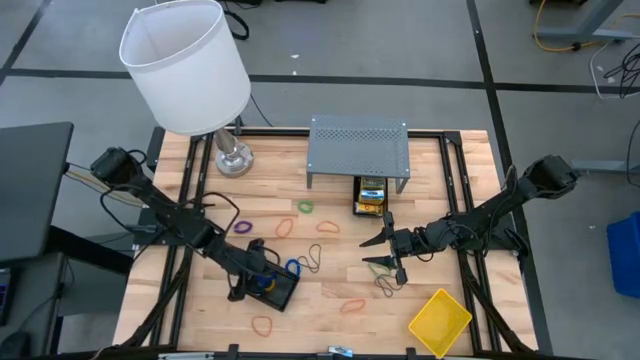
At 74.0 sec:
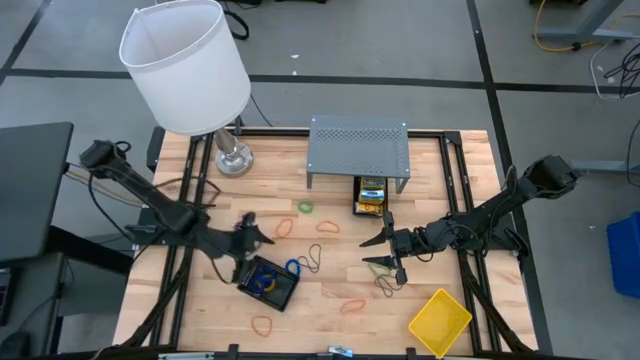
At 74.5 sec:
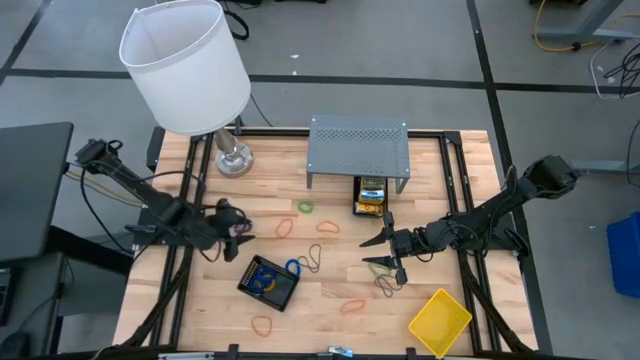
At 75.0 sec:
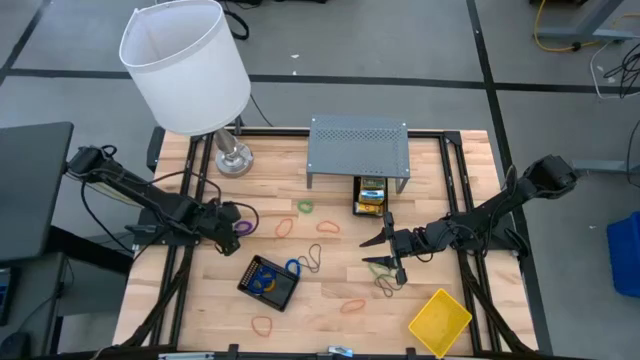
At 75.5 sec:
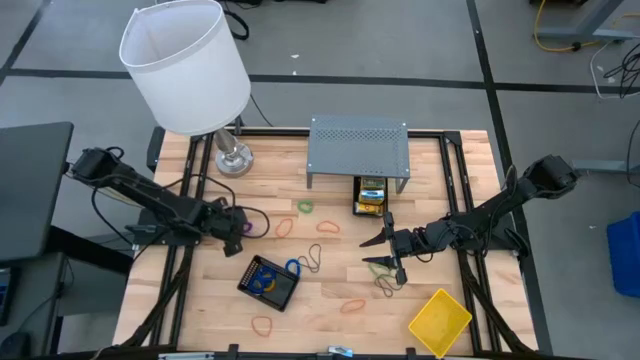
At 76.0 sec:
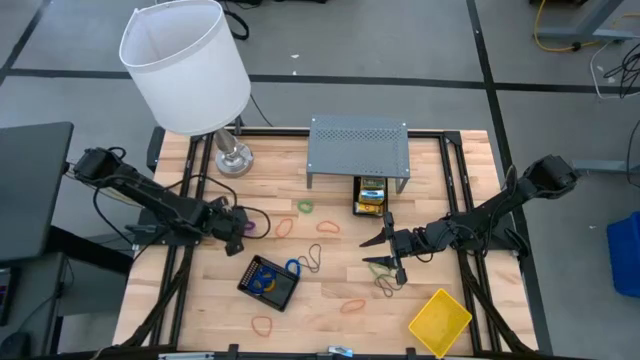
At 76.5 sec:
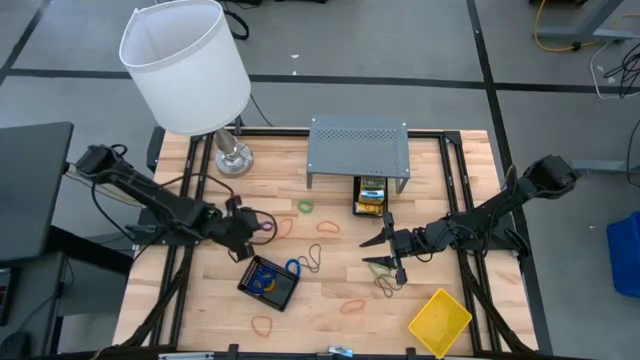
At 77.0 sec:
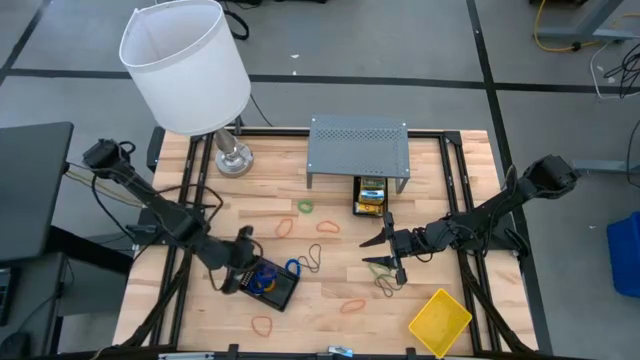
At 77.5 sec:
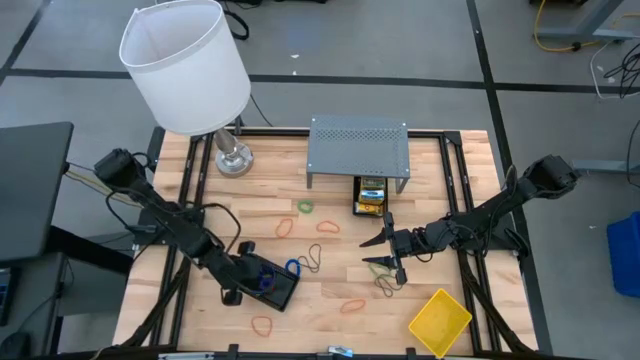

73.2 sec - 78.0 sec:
Task: Pick & Place Office Desk Supplies
Put the purple spring keychain into the bottom black bin

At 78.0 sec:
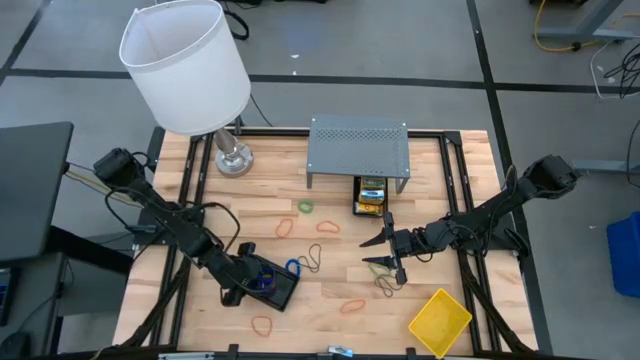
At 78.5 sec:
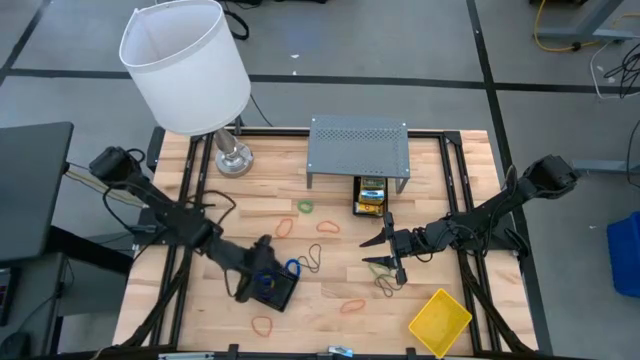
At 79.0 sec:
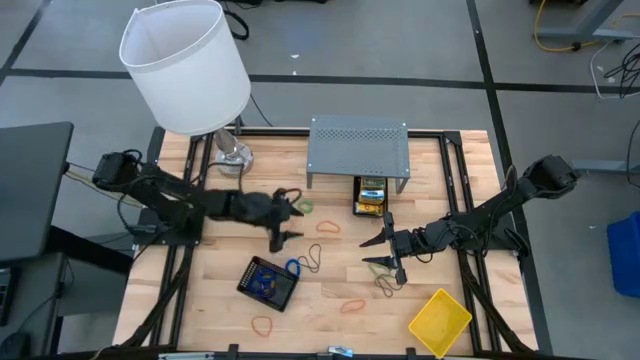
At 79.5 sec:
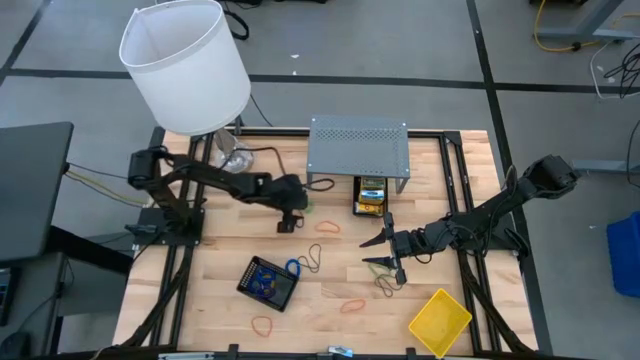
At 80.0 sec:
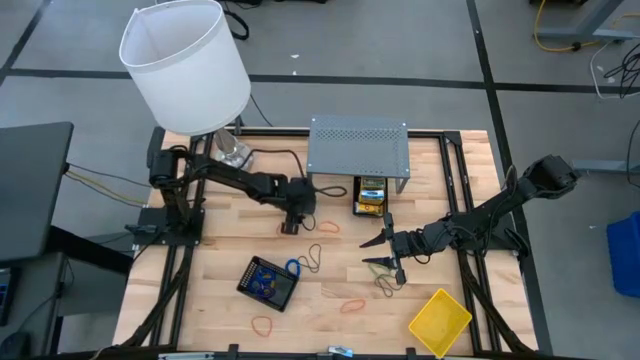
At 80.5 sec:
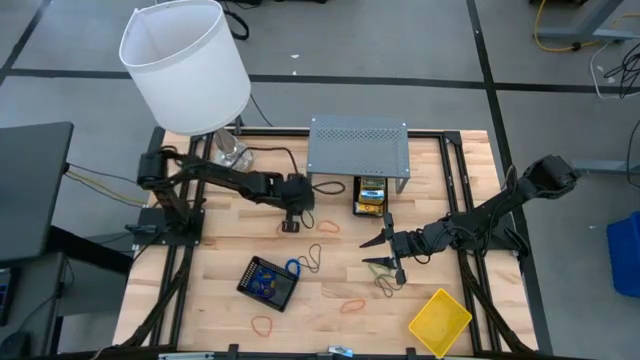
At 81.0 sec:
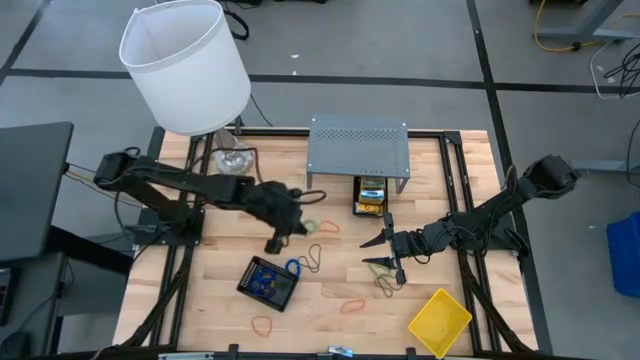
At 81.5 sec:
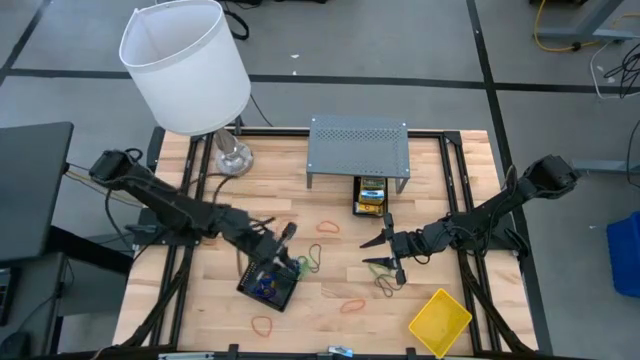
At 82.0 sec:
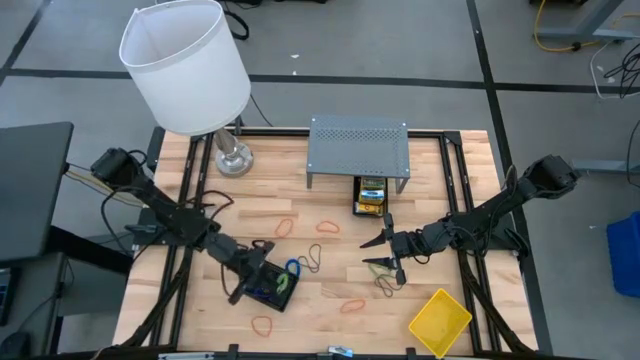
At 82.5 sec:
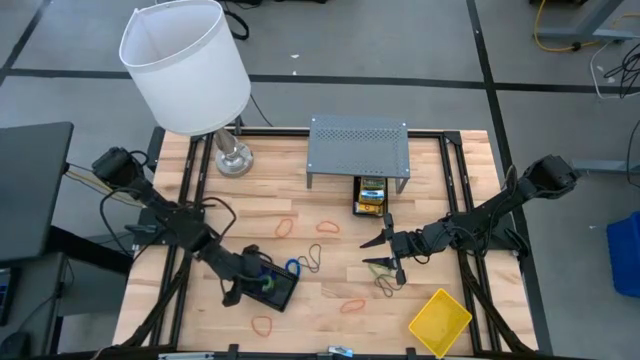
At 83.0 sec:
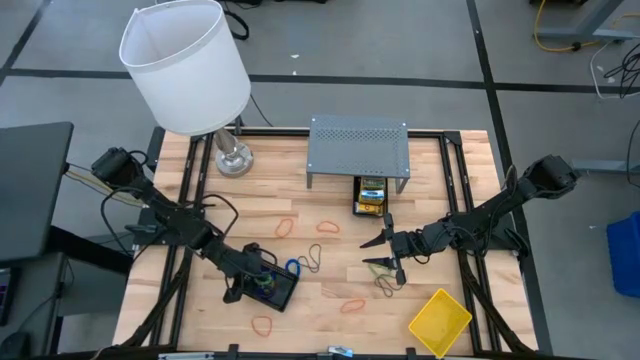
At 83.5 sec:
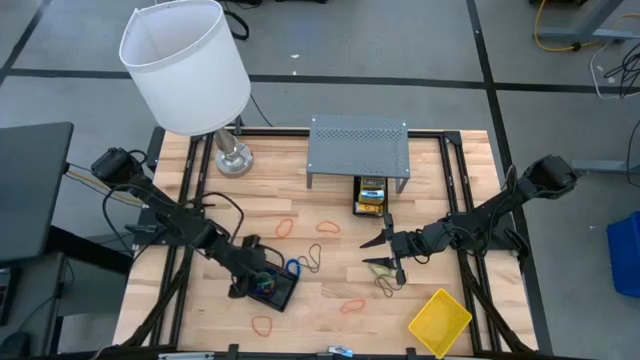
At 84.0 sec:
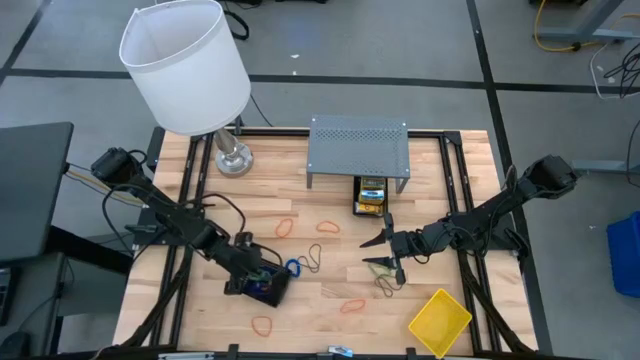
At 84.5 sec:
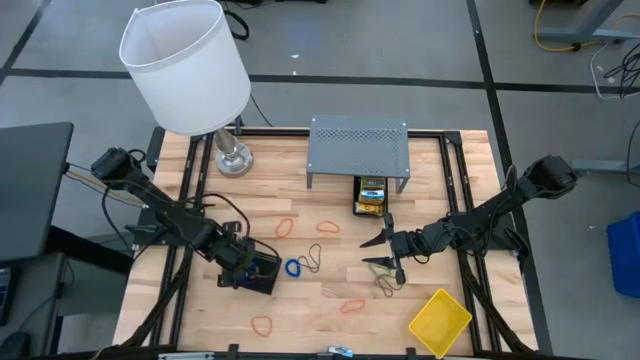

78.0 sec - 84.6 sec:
Put the green spring keychain into the bottom black bin

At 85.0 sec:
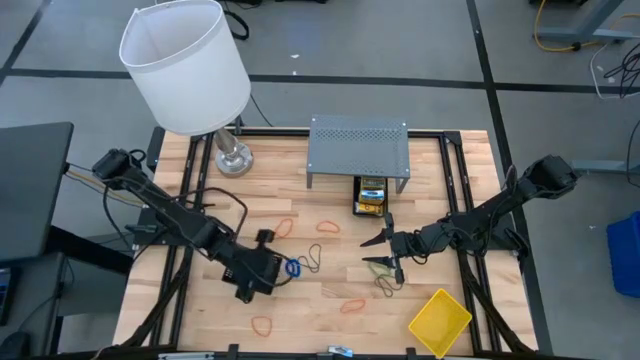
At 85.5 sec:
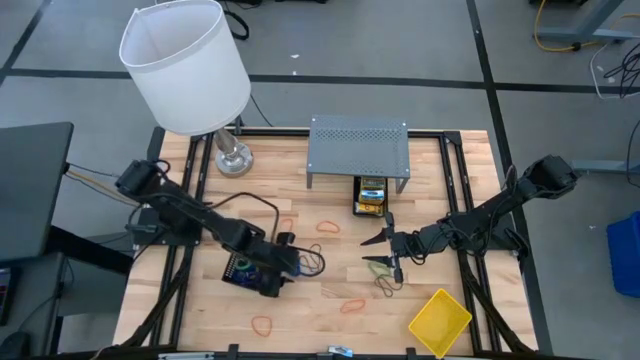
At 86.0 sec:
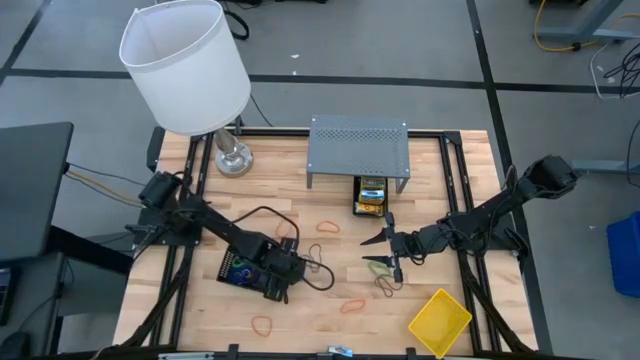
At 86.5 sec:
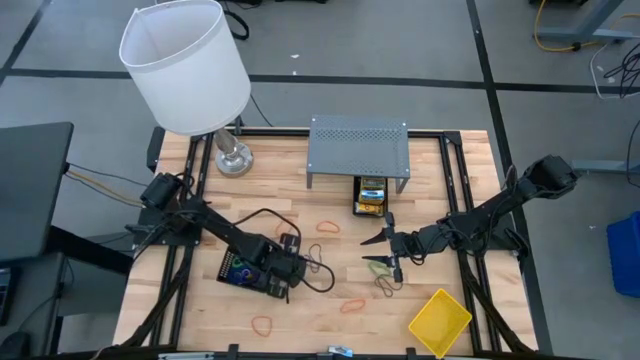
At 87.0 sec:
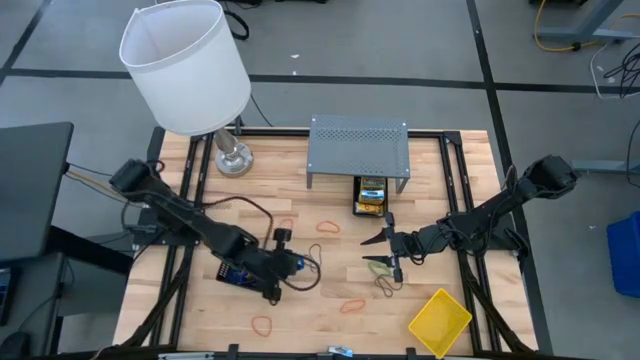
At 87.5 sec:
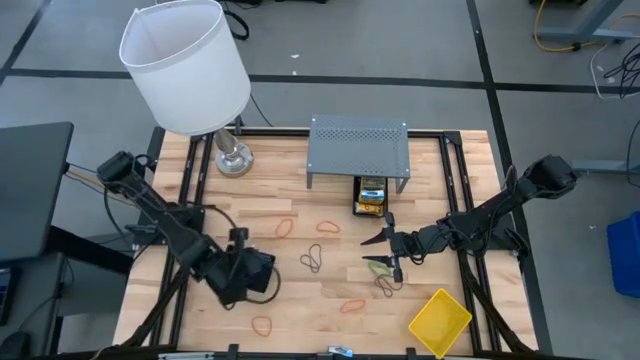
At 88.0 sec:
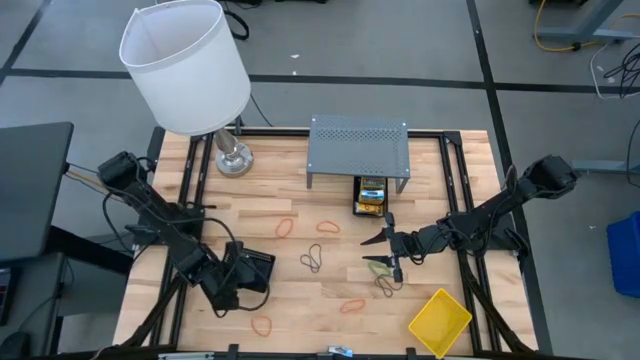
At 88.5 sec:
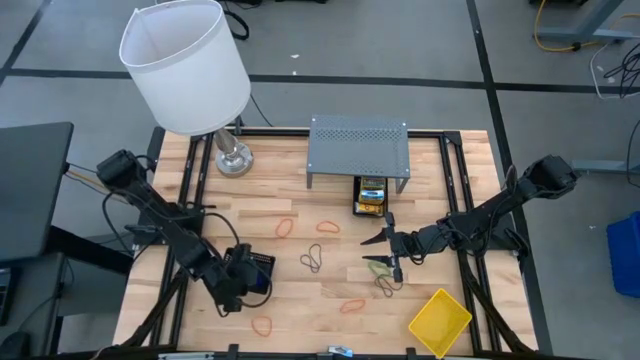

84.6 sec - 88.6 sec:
Put the blue spring keychain into the bottom black bin

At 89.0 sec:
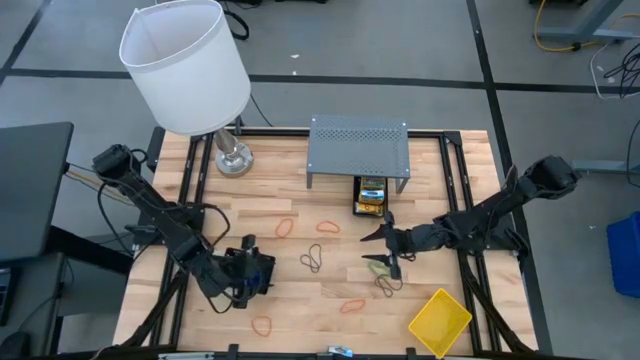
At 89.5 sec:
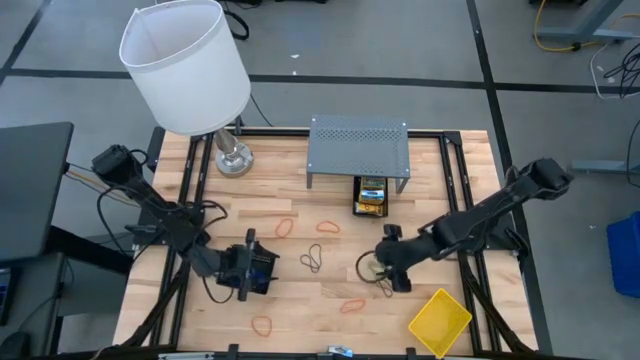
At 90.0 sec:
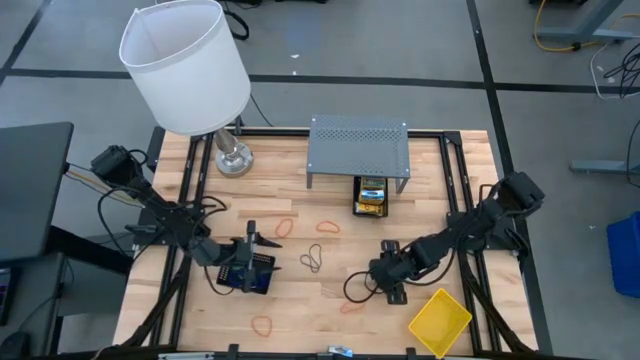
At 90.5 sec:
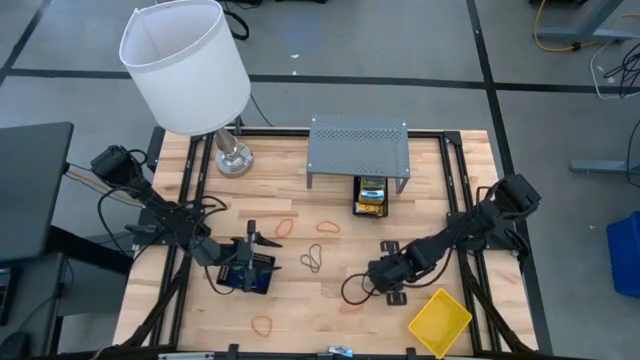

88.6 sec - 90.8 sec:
Put the green rubber band into the yellow bin

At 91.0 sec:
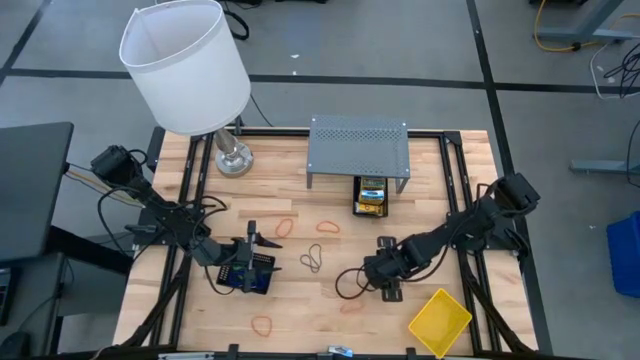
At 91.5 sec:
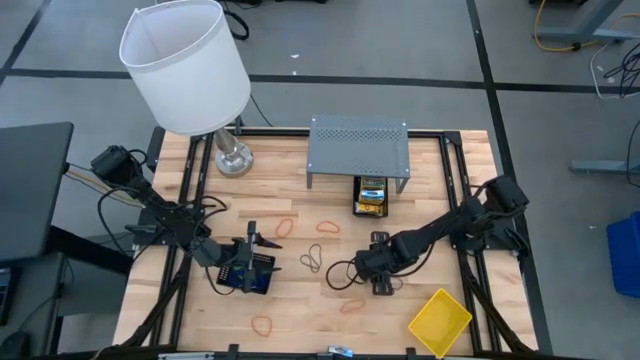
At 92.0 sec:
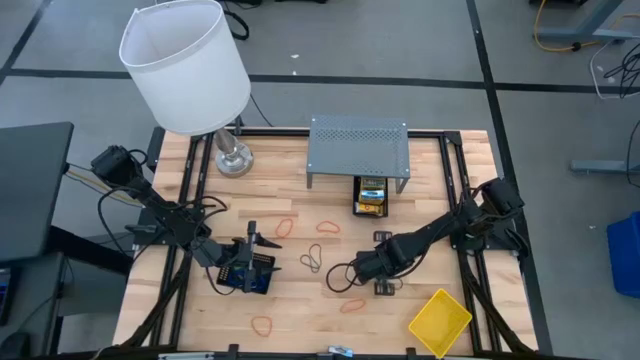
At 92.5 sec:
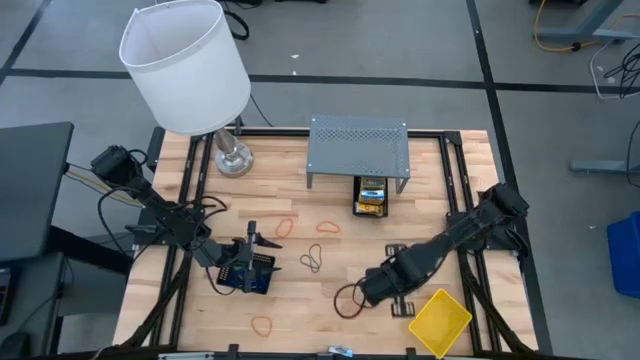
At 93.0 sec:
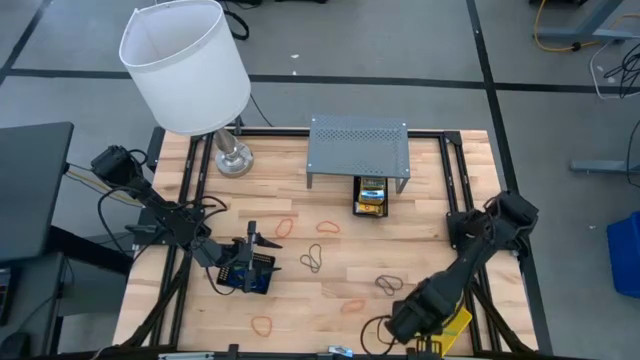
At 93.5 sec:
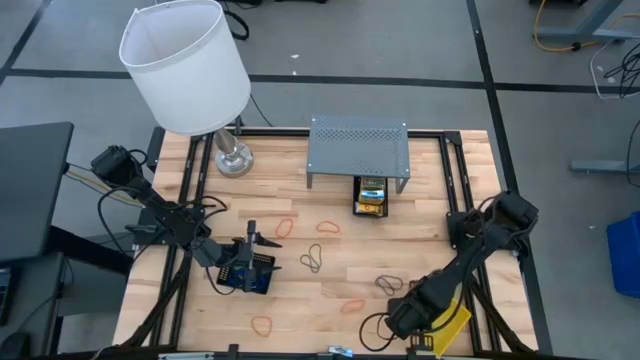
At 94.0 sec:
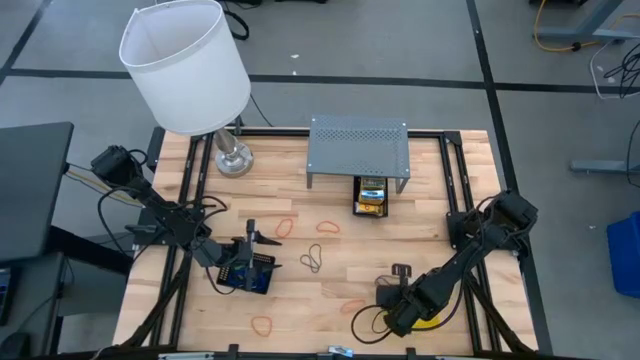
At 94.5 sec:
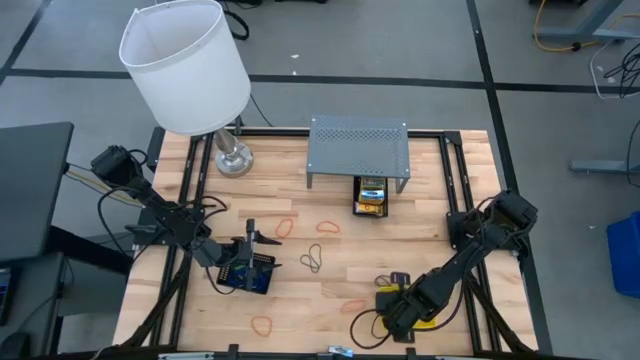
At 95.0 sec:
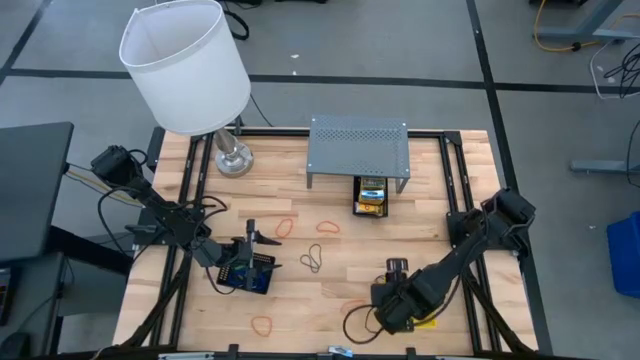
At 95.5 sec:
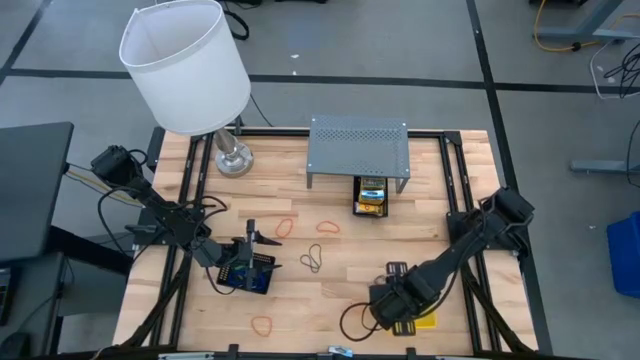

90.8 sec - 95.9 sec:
Put the green rubber band into the yellow bin
